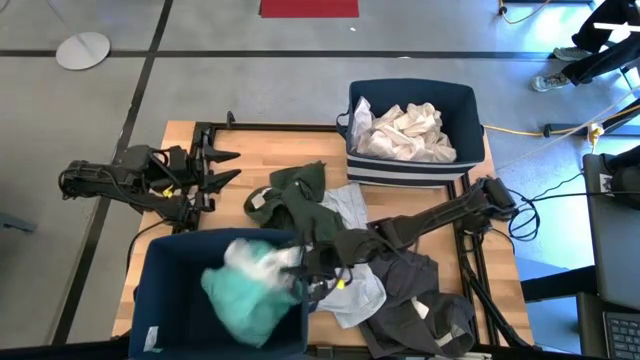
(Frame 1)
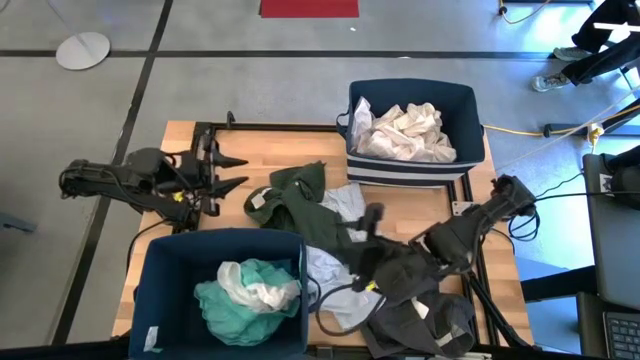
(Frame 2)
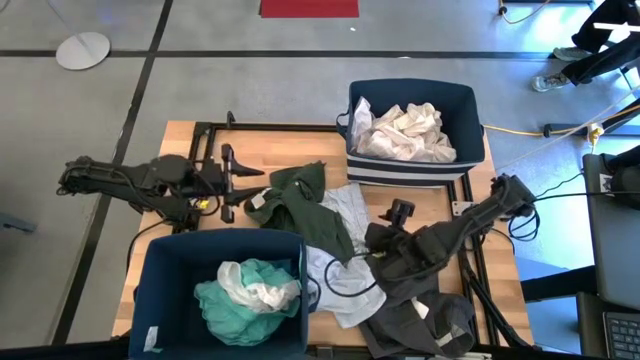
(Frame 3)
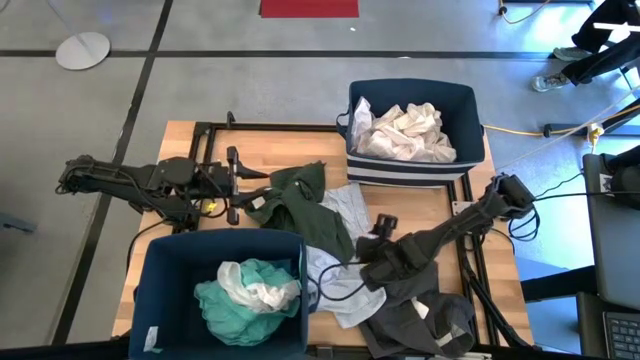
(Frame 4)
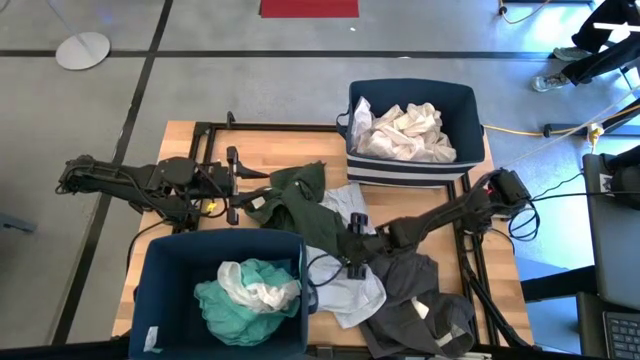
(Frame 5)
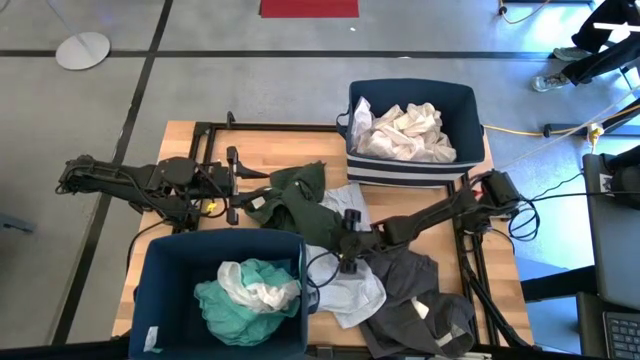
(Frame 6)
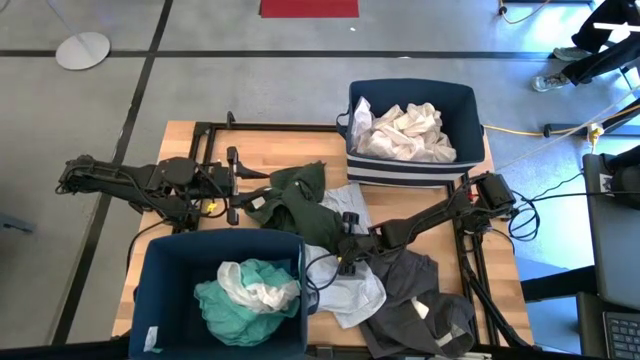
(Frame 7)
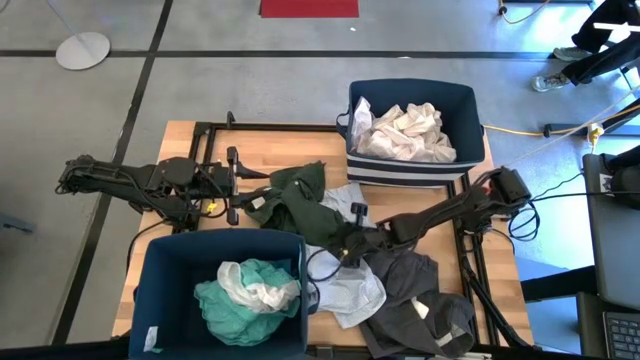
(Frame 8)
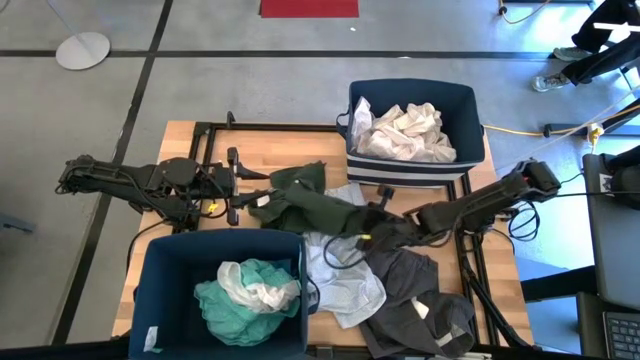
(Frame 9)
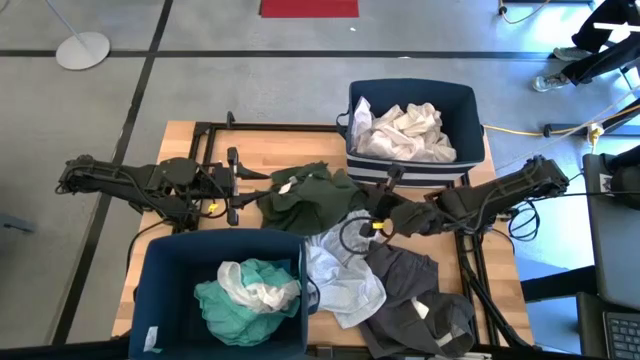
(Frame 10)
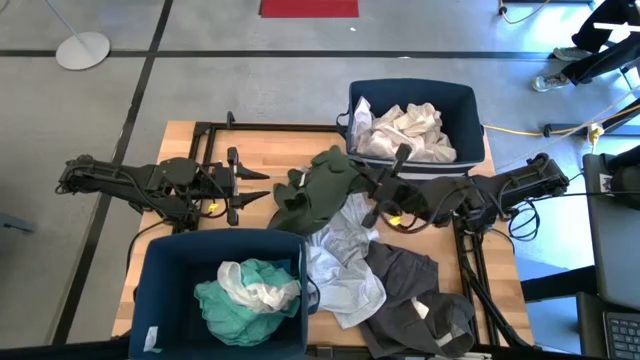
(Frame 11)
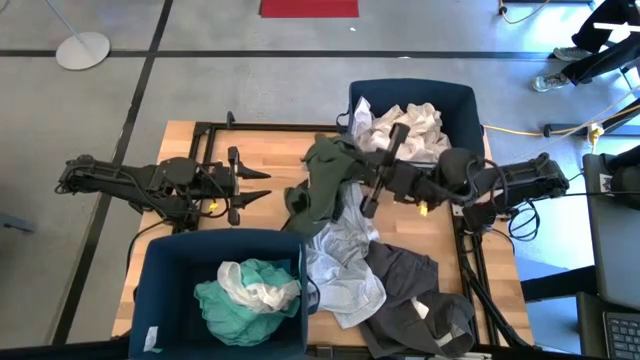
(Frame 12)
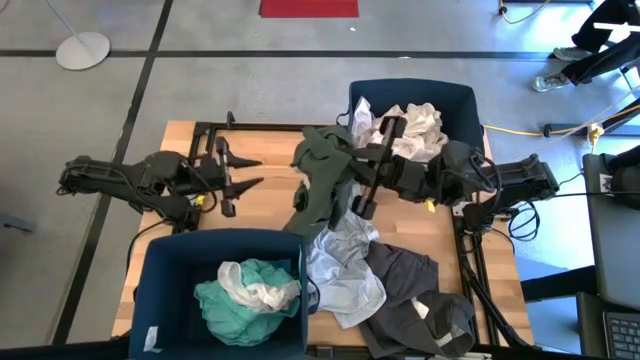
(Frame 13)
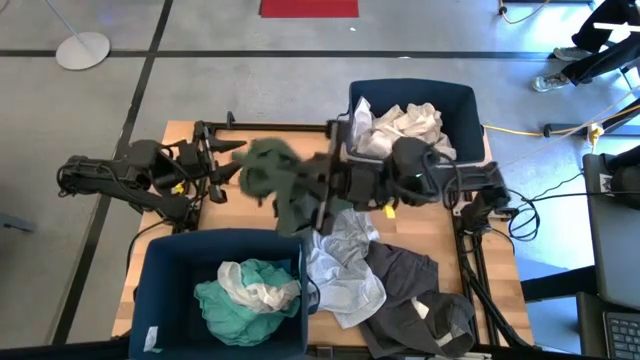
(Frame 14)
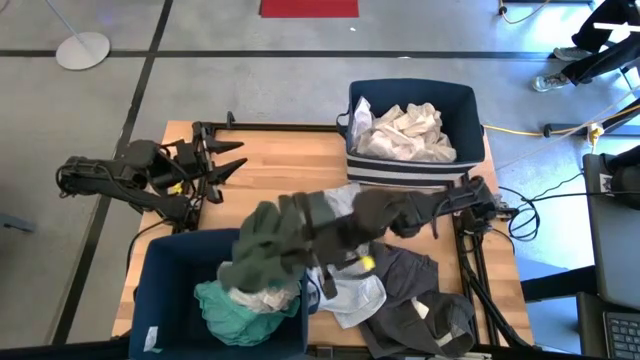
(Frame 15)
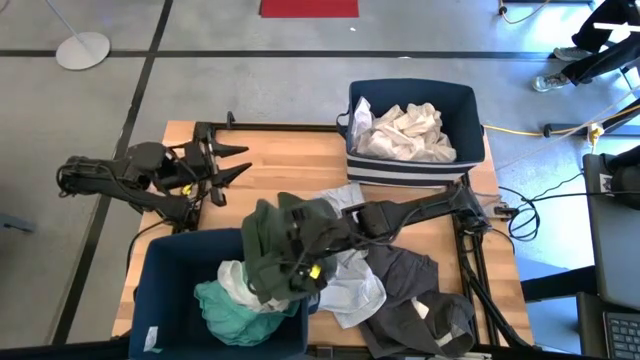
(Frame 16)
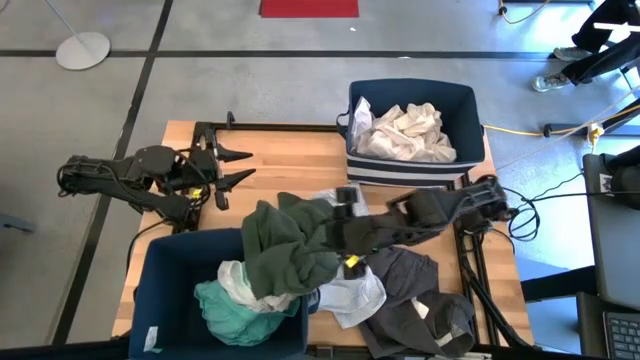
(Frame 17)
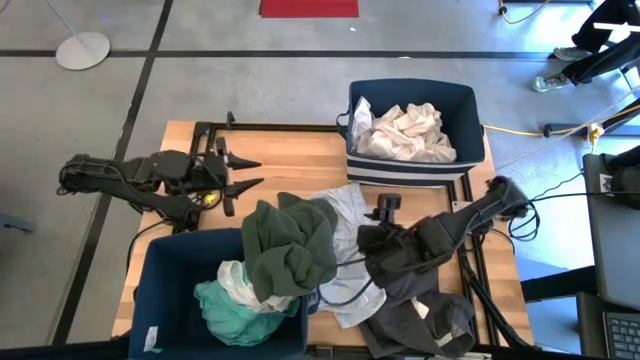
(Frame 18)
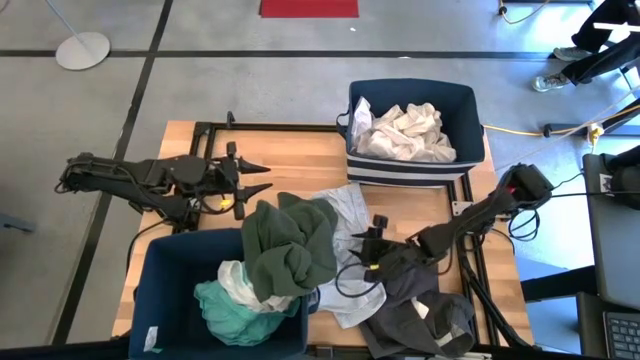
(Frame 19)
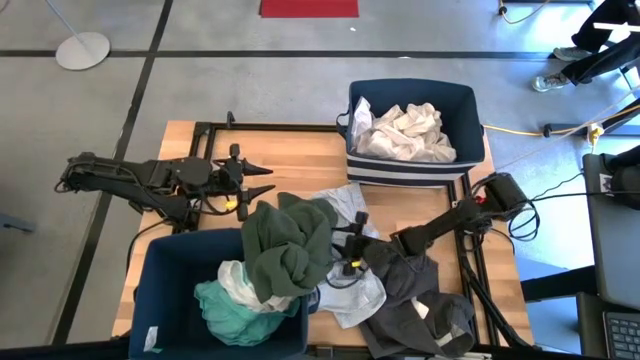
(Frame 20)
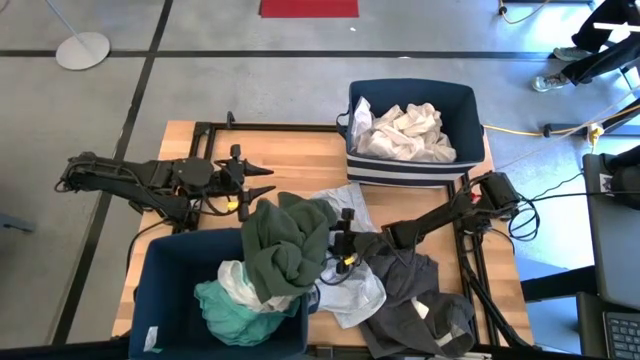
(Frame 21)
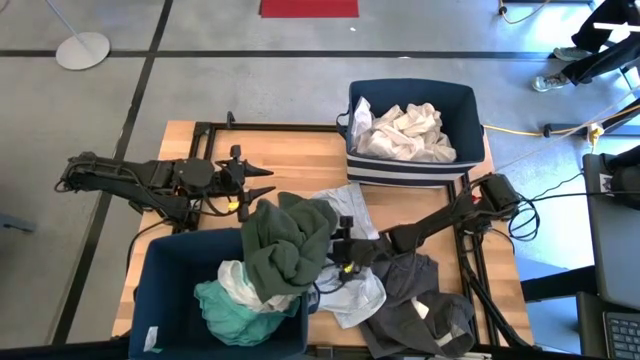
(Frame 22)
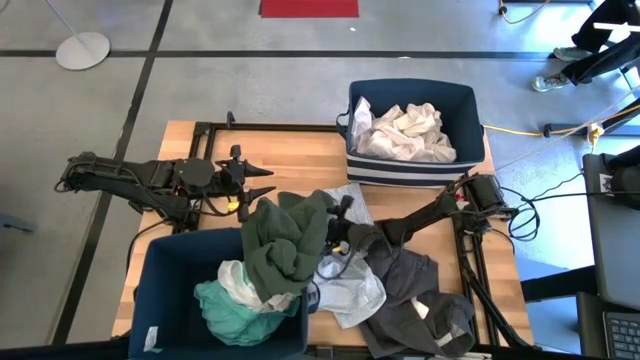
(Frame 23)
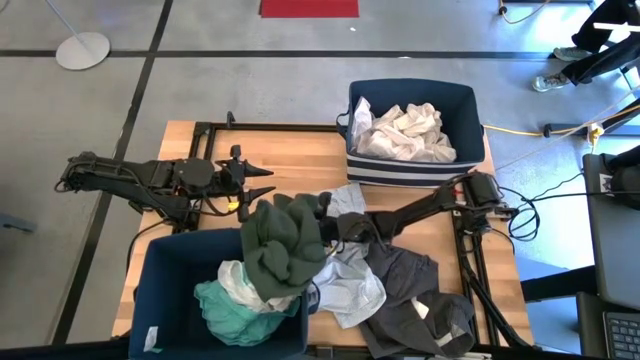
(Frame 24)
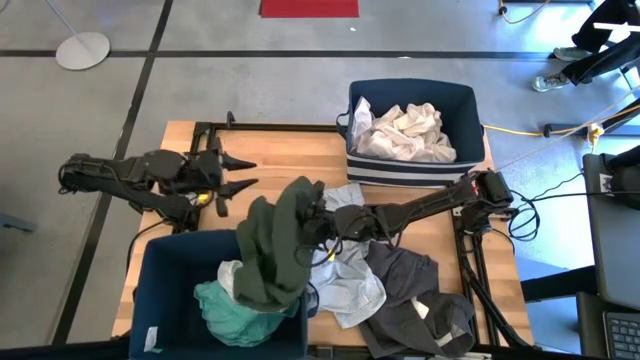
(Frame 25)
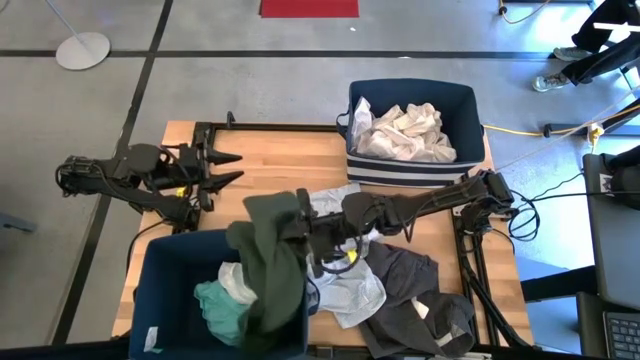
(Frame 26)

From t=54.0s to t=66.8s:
Task: Sort clothes
Put the dark green polo shirt into the bottom laundry bin

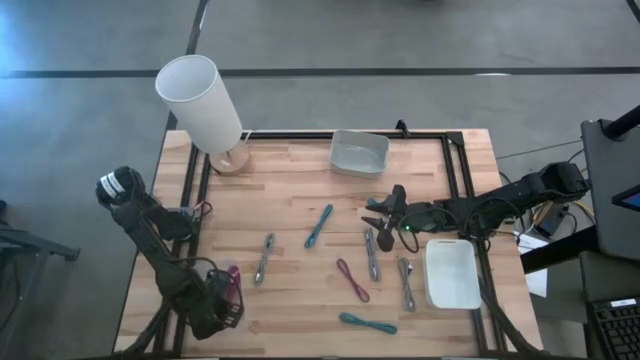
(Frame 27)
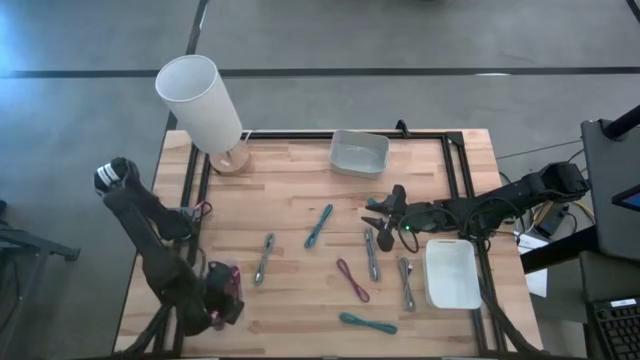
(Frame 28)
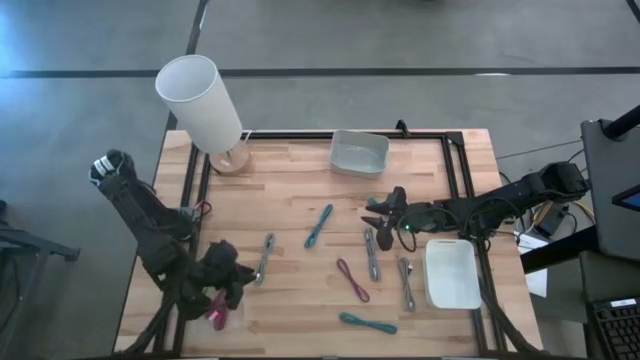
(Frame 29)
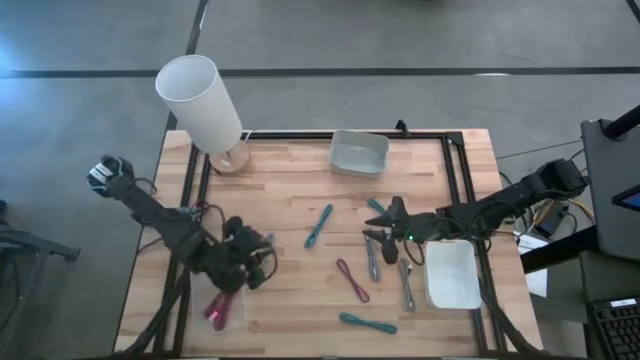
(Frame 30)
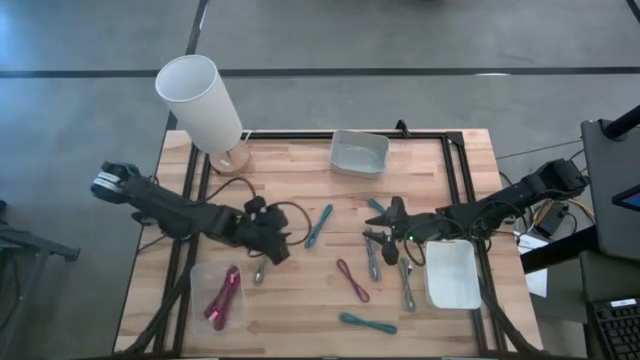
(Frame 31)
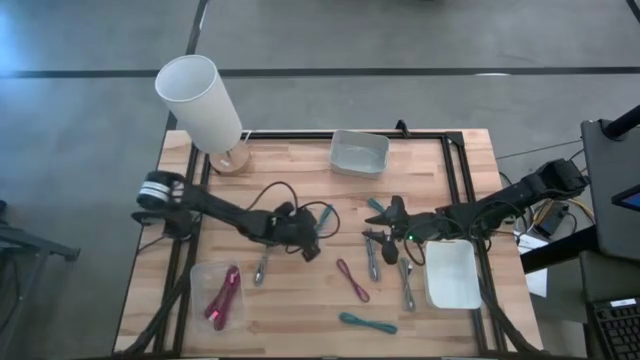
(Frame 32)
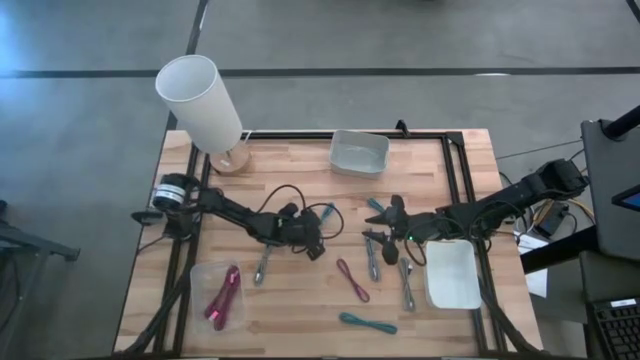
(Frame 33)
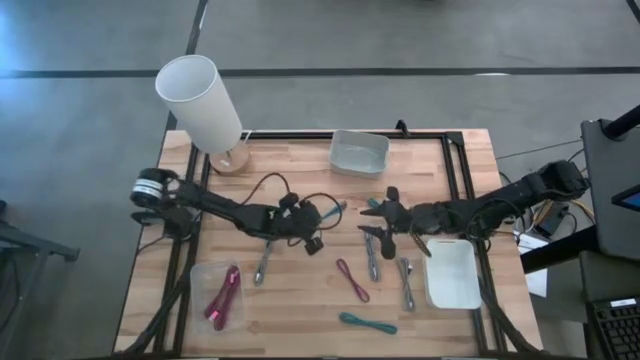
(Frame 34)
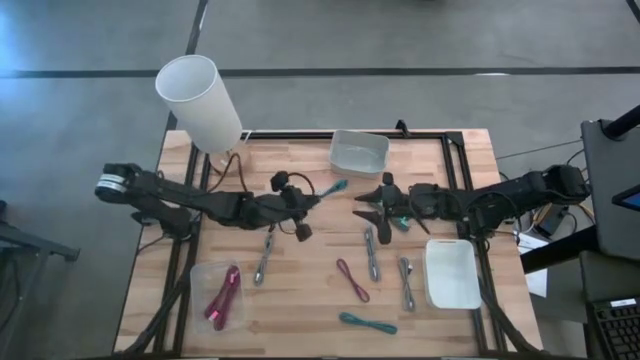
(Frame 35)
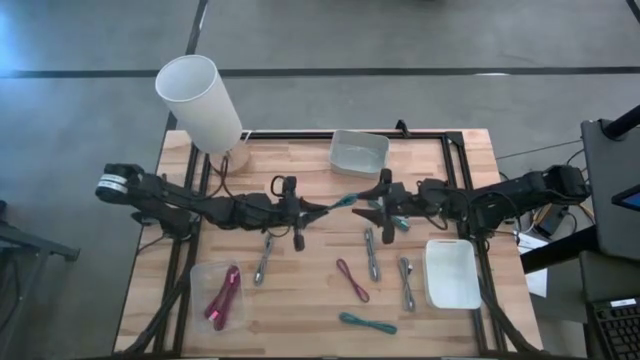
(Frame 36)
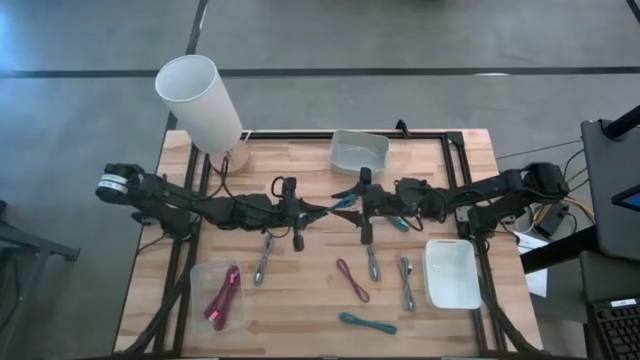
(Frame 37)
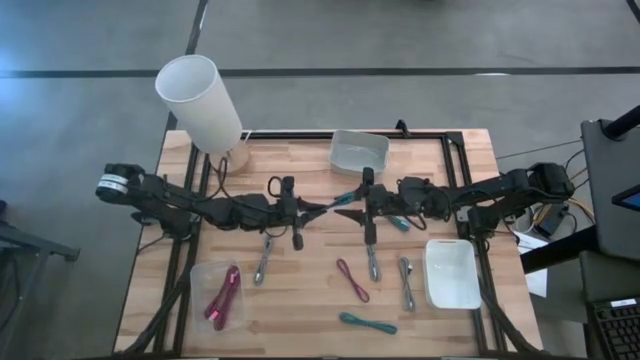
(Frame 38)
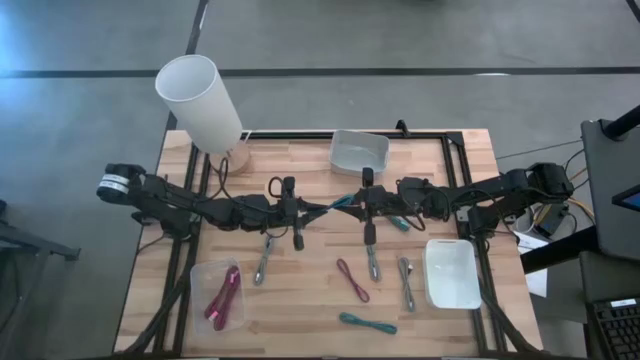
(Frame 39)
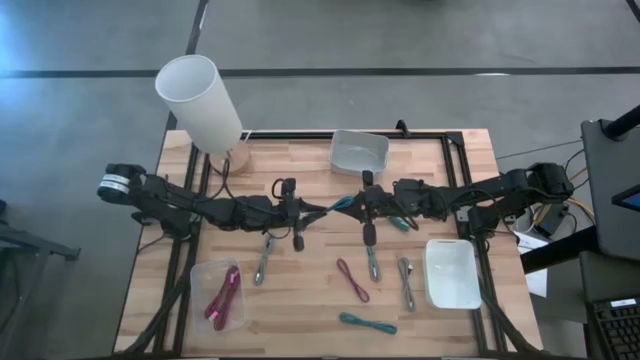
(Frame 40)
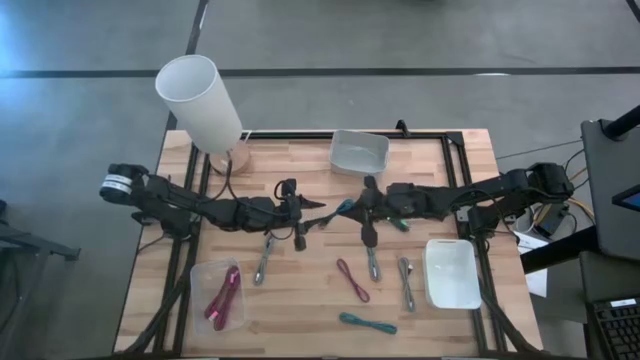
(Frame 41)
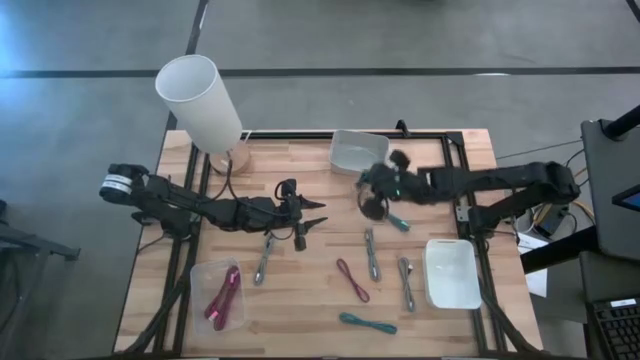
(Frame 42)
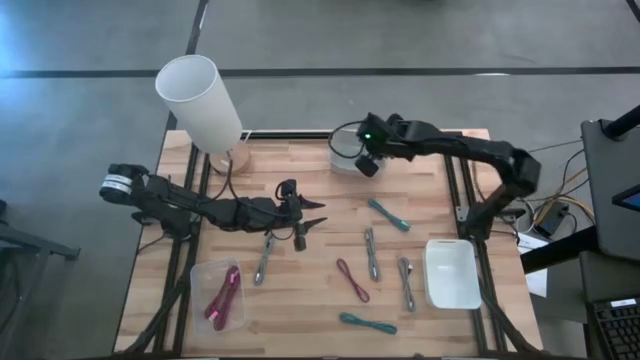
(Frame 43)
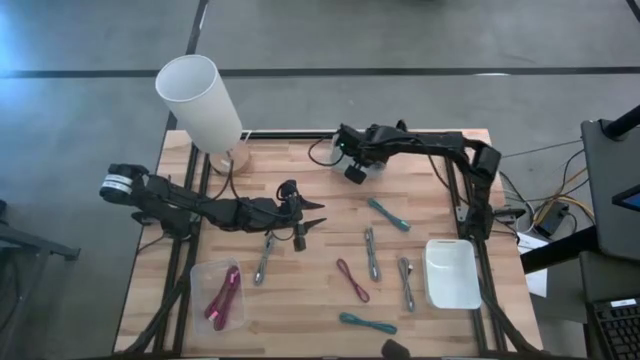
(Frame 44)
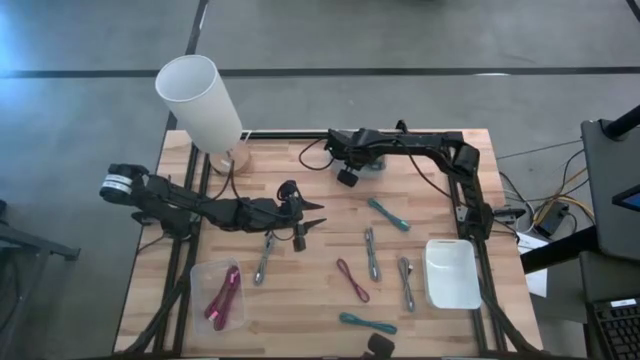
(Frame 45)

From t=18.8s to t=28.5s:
Task: Pick & Place USB Port
Put the left blue striped charger cable into the gray bin
